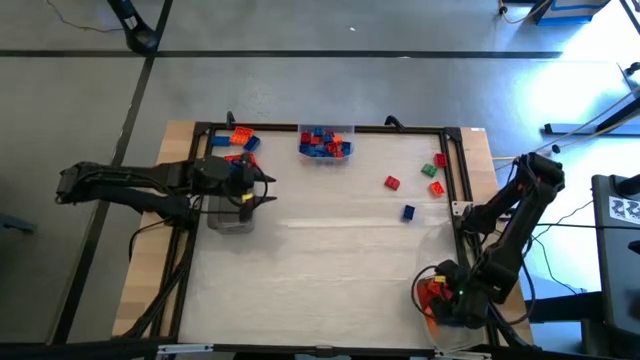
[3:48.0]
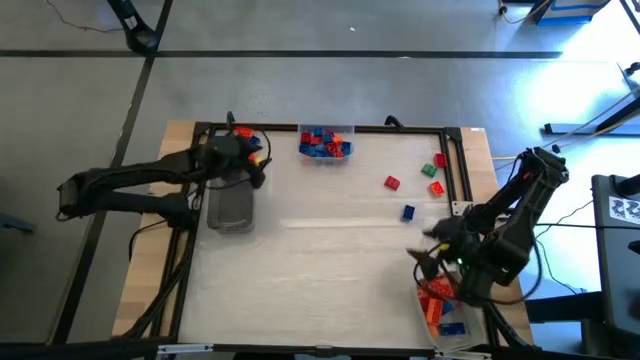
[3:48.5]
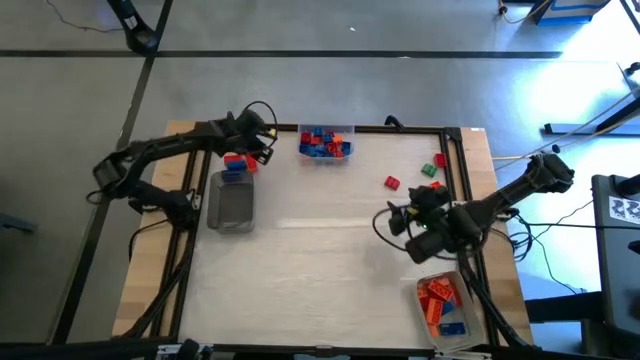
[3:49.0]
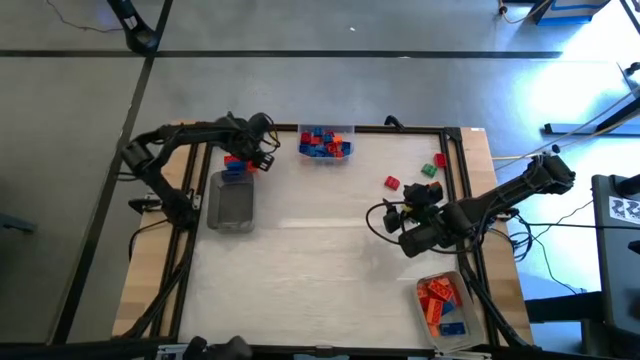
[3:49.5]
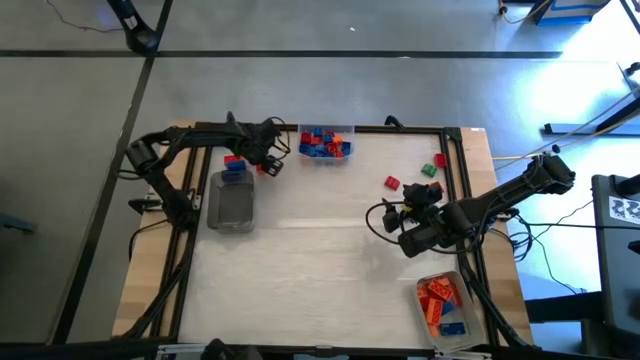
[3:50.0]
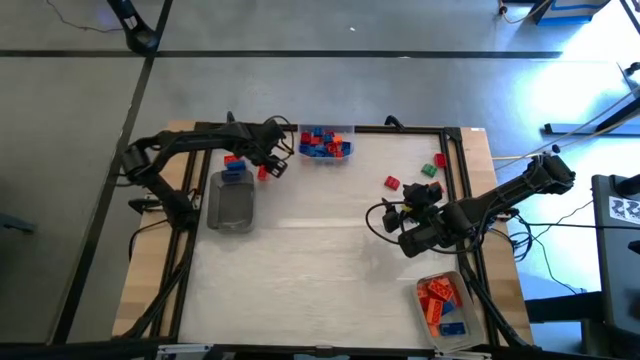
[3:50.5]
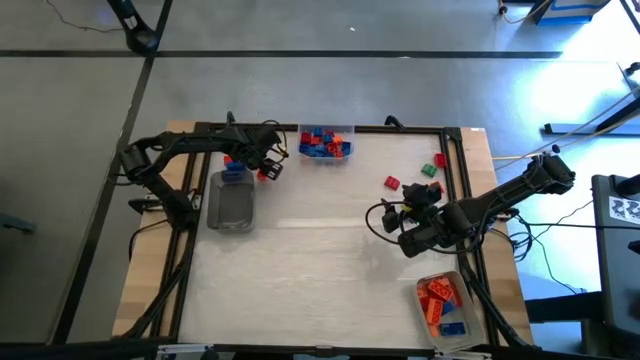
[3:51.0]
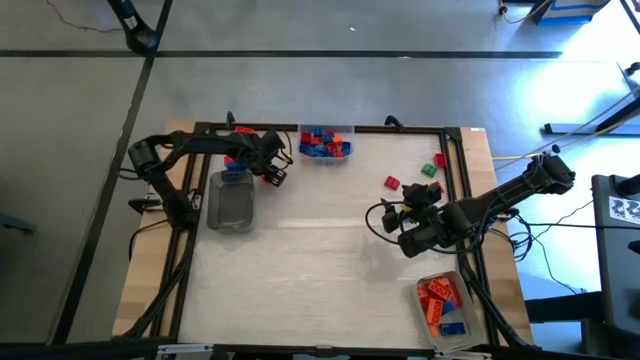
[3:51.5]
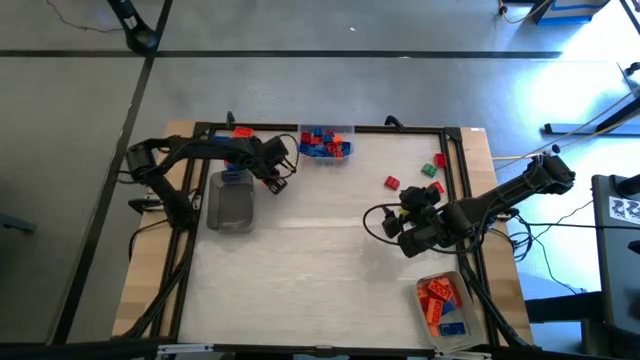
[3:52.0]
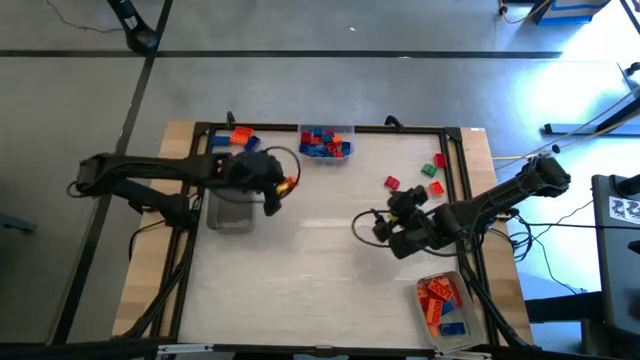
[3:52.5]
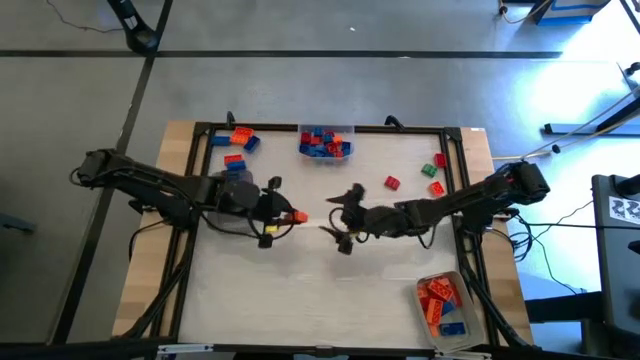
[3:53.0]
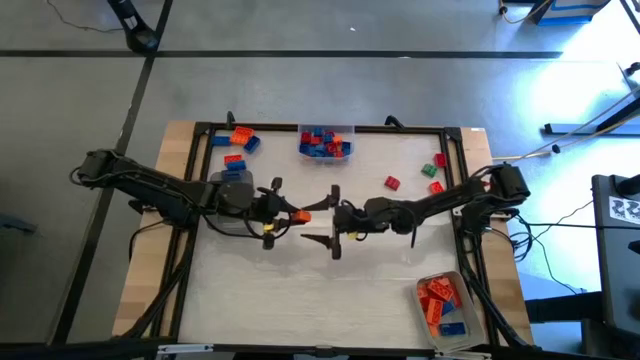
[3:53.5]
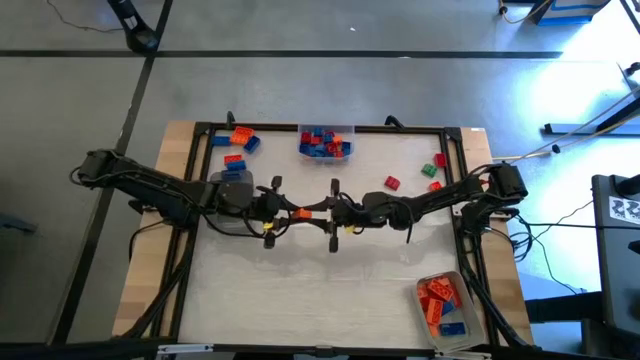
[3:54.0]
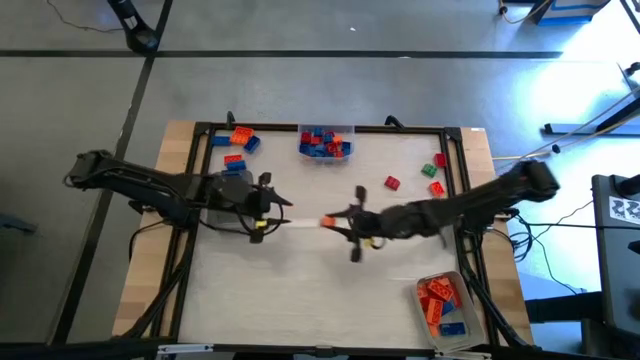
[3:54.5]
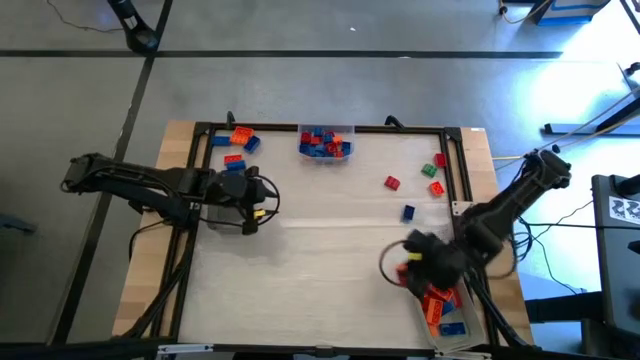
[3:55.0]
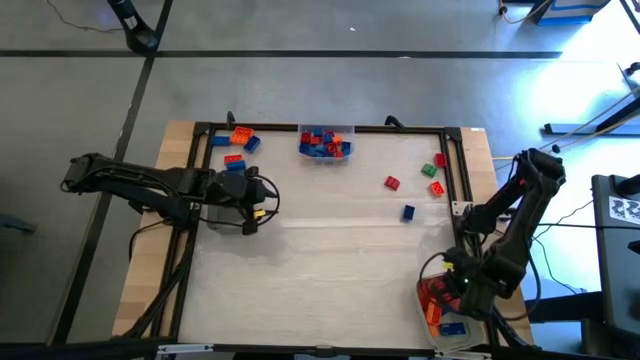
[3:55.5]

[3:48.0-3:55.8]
Task: Sort blocks by size
Put the orange 8 stud game piece into the gray bin

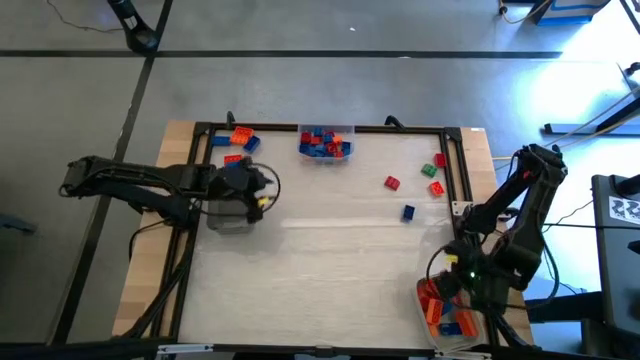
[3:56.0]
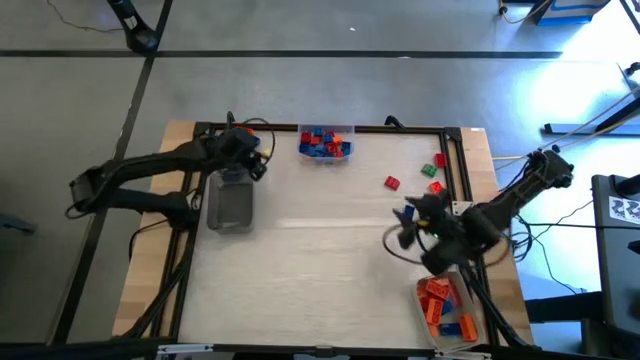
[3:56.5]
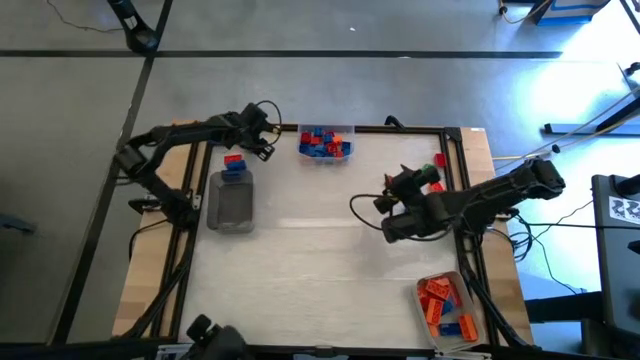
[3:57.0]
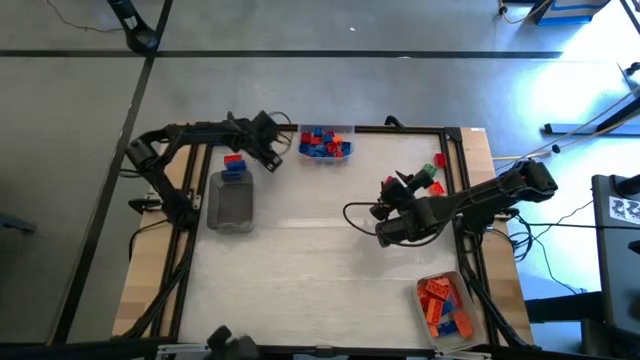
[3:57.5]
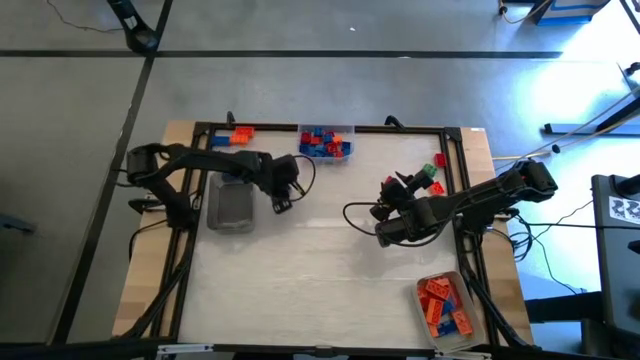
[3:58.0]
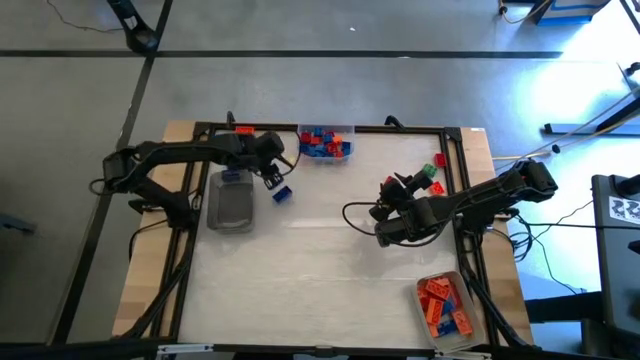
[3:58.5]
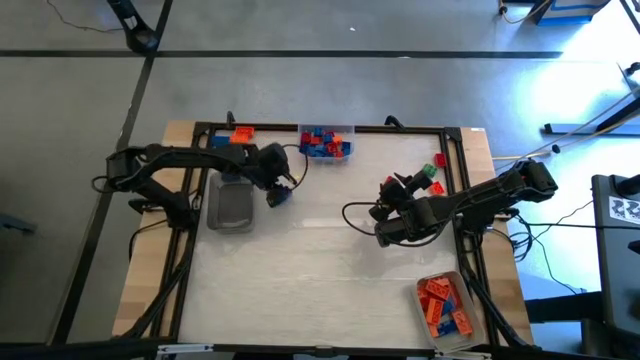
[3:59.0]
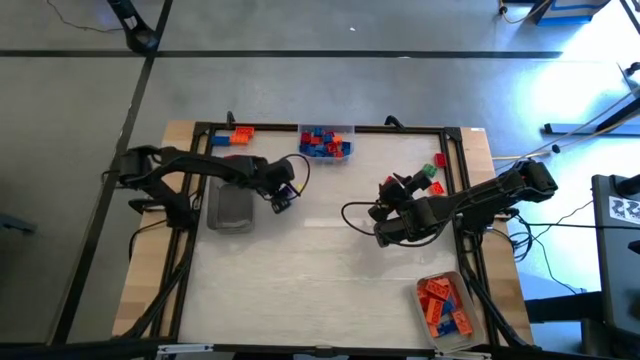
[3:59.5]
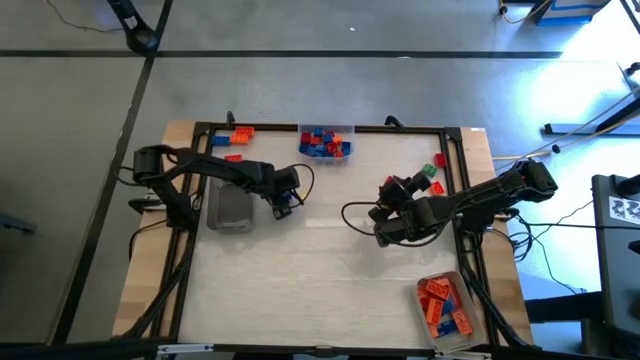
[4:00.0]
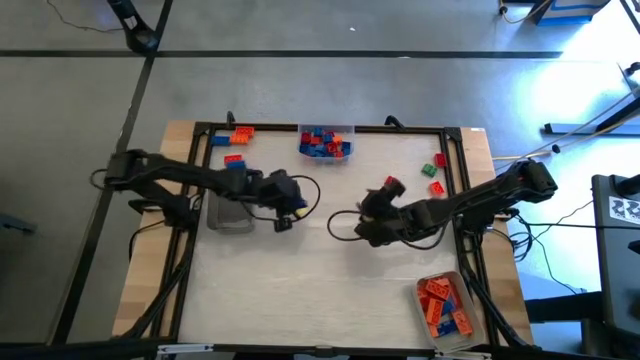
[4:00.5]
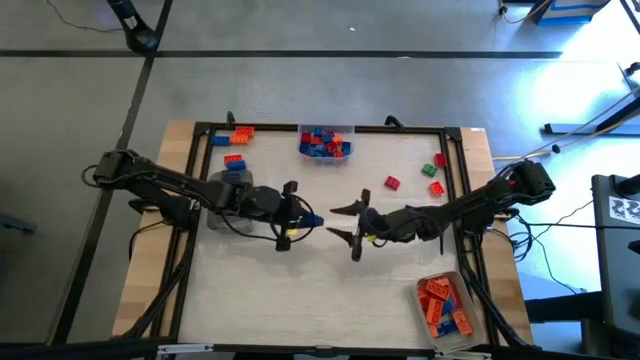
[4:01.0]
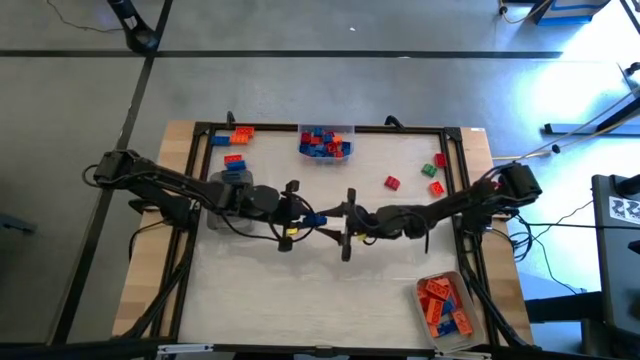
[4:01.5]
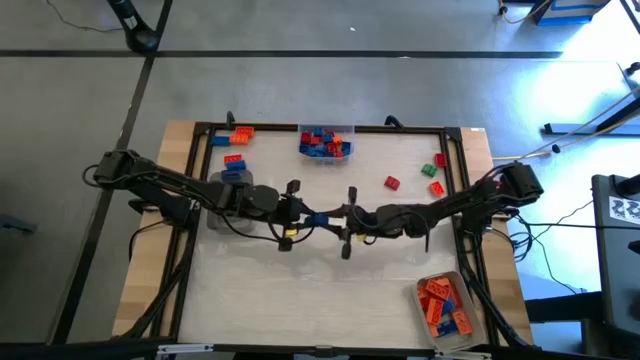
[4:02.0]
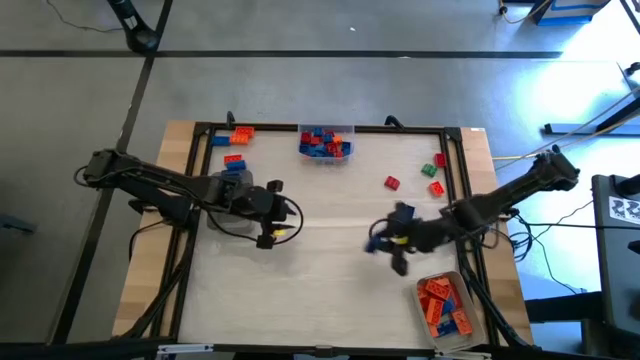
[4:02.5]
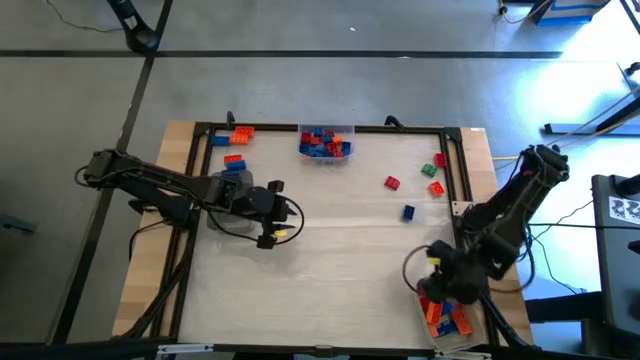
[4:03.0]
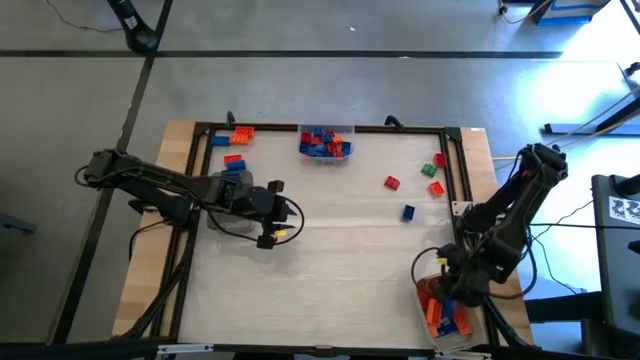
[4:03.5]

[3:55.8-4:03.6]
Put the blue 8 stud game piece into the gray bin

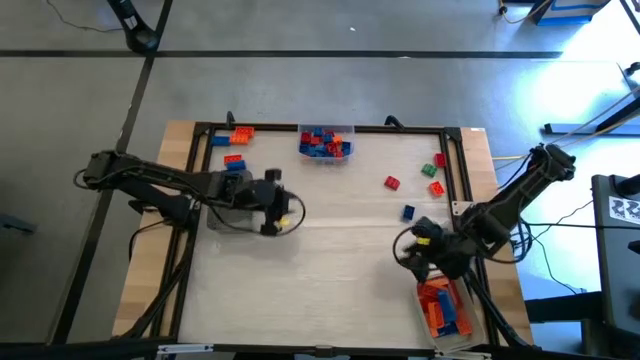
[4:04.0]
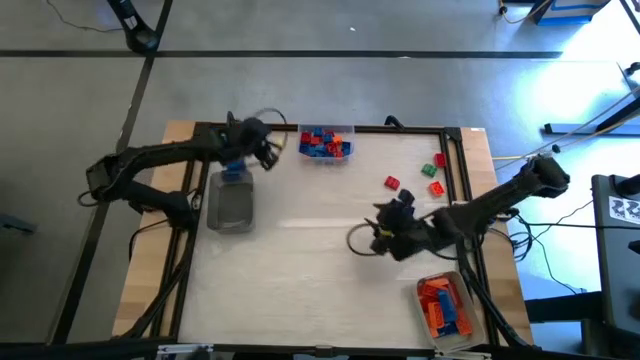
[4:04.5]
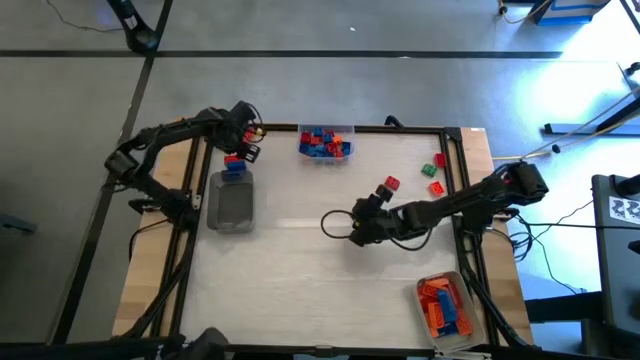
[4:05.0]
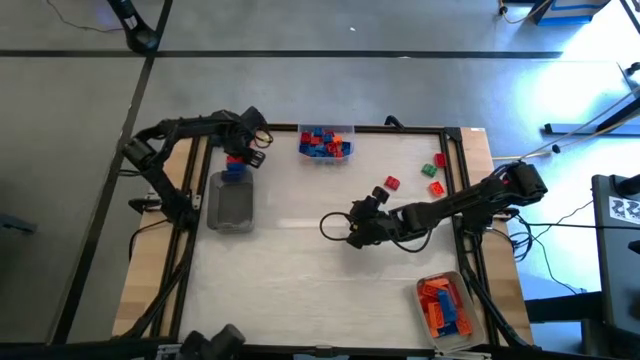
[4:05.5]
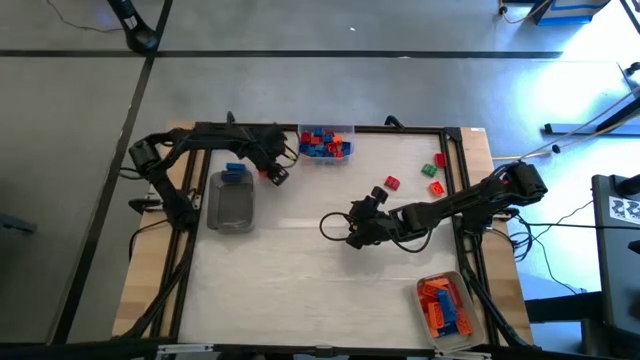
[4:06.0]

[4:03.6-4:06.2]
Adjust the orange 8 stud game piece on the table

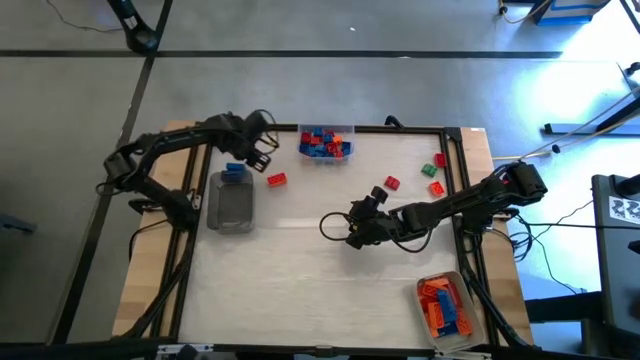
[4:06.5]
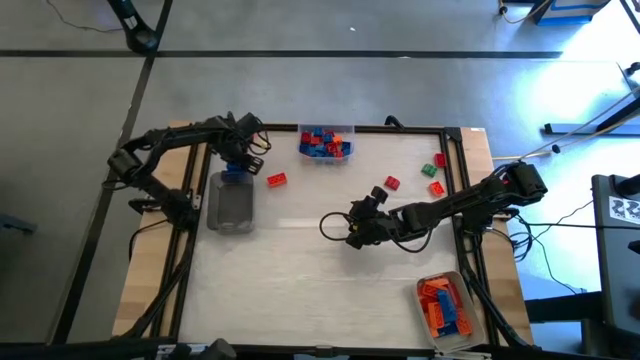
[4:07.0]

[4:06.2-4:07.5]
Put the blue 8 stud game piece into the gray bin

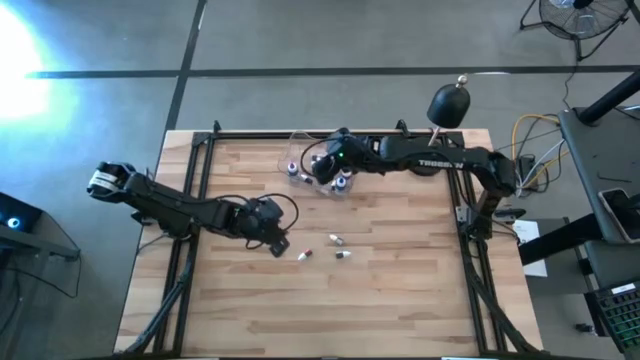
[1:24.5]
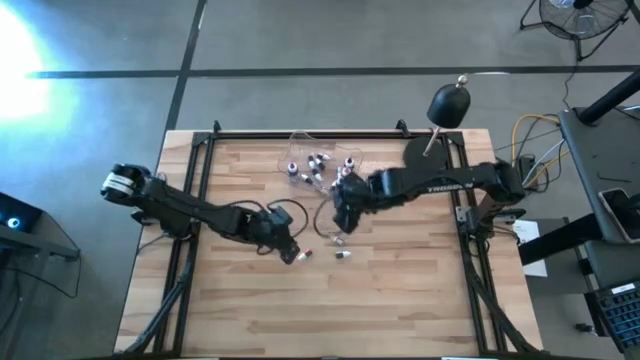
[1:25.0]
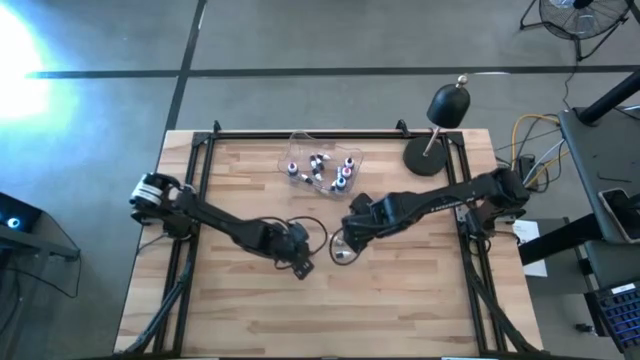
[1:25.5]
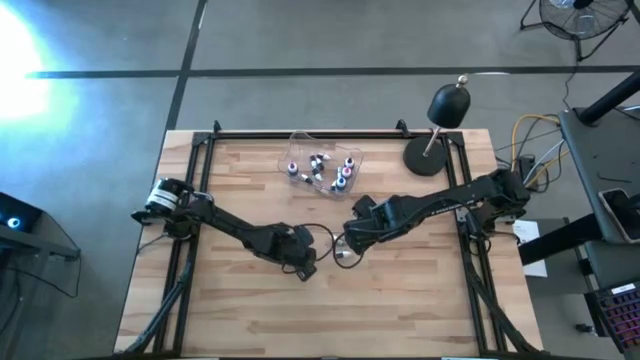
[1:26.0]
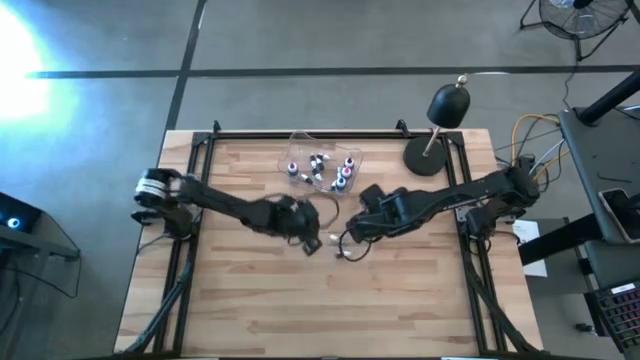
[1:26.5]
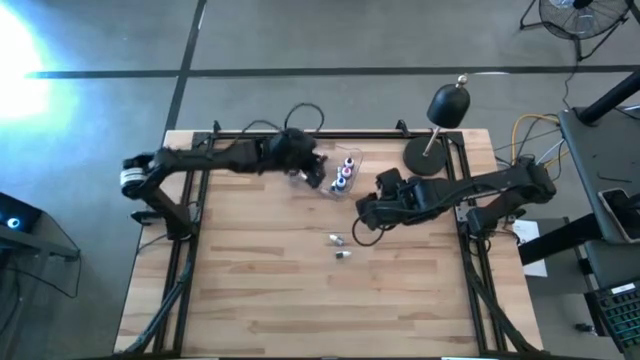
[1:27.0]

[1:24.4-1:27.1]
Task: Pick & Place food coloring
Put the small red food coloring bottle into the transparent bin
